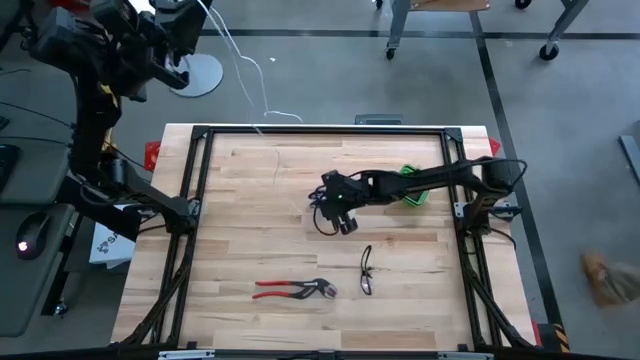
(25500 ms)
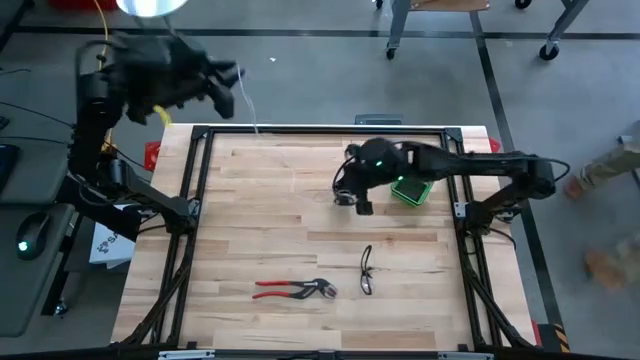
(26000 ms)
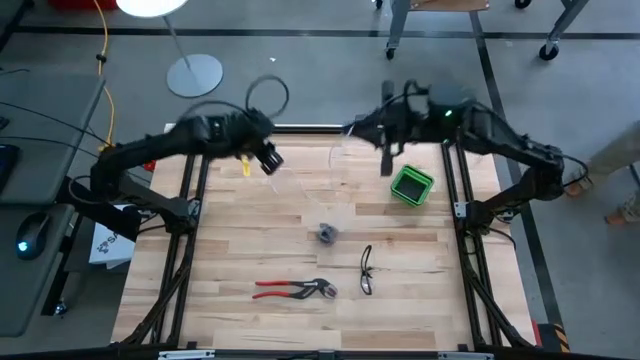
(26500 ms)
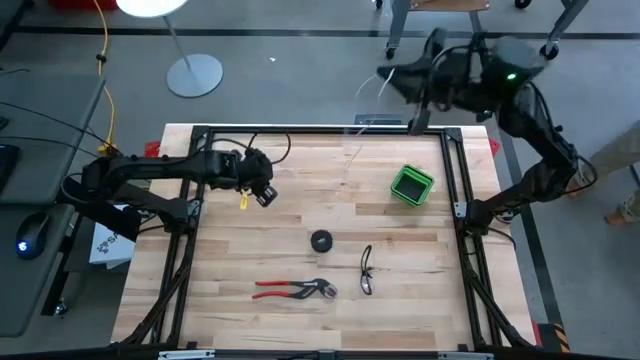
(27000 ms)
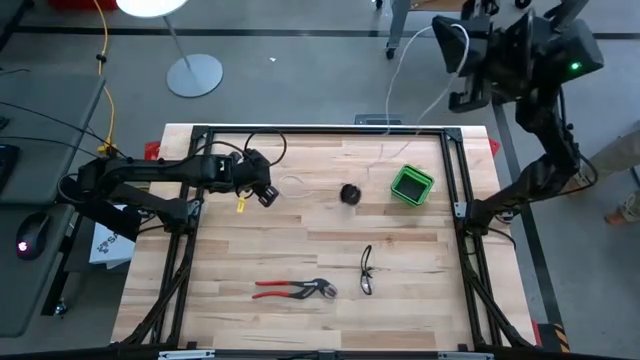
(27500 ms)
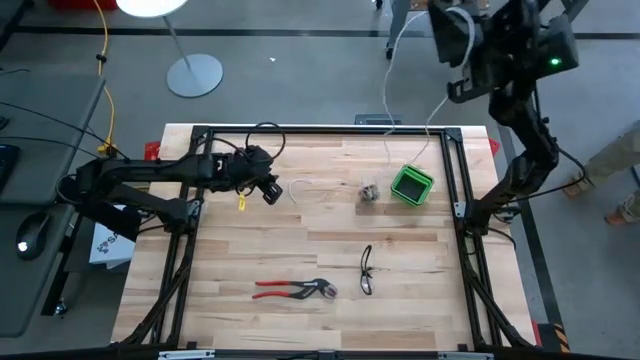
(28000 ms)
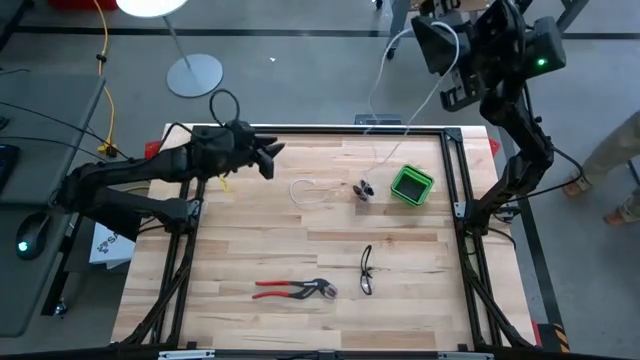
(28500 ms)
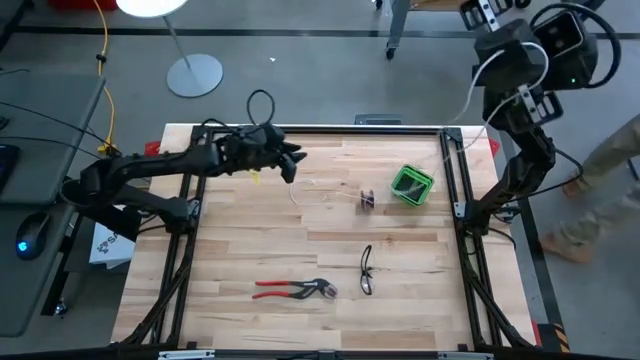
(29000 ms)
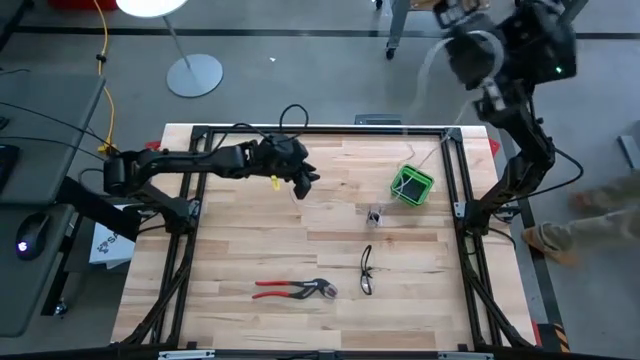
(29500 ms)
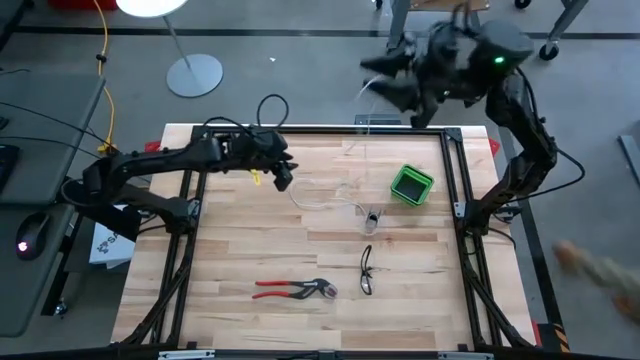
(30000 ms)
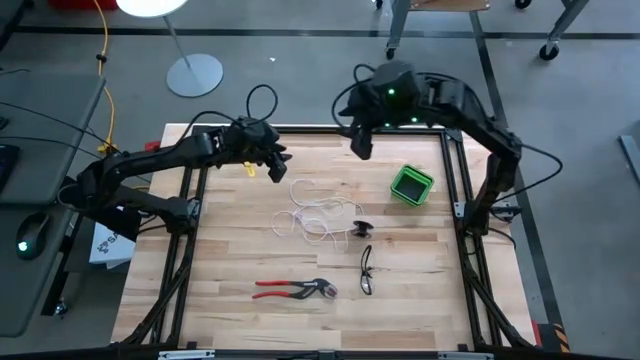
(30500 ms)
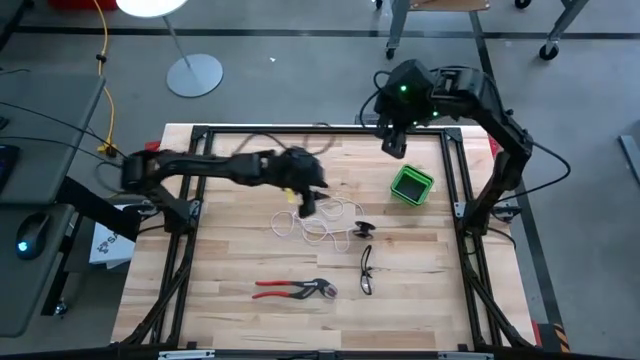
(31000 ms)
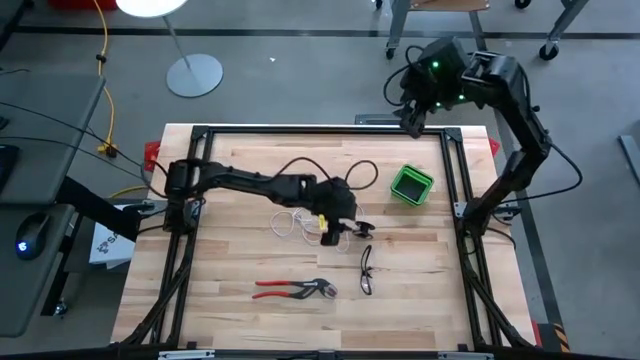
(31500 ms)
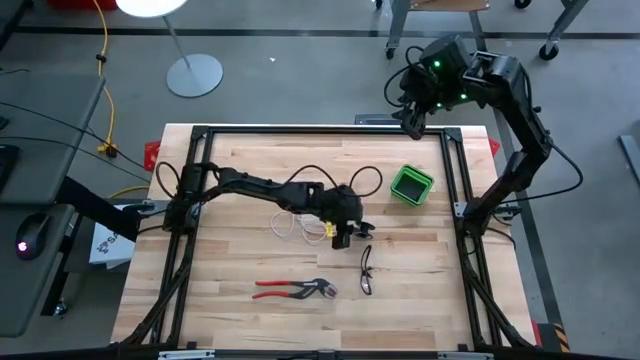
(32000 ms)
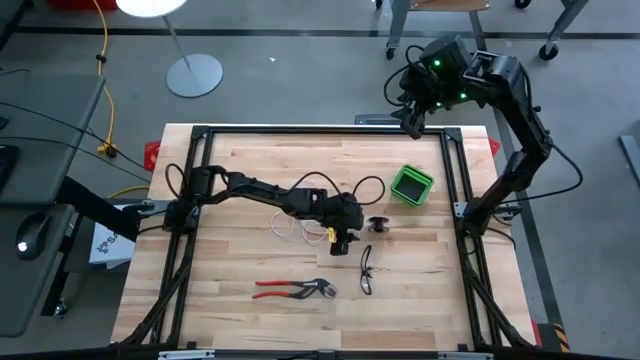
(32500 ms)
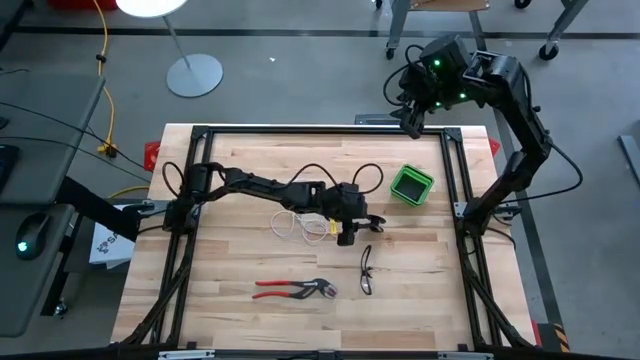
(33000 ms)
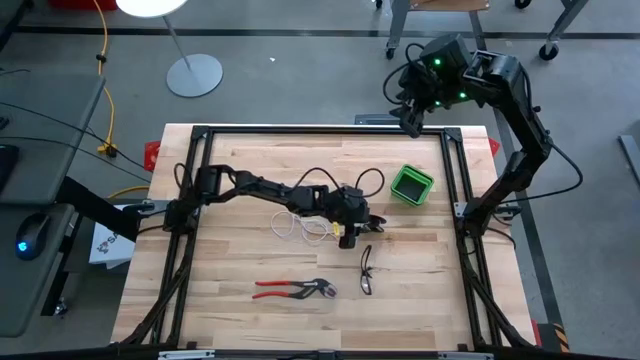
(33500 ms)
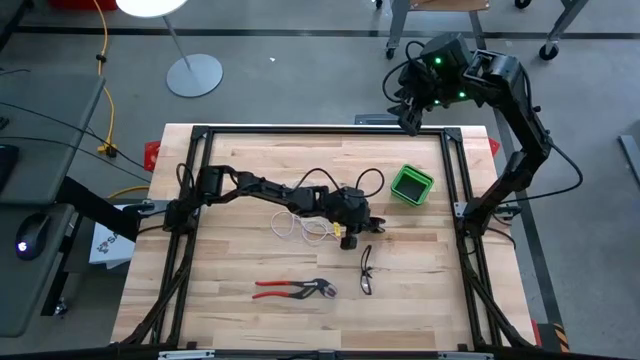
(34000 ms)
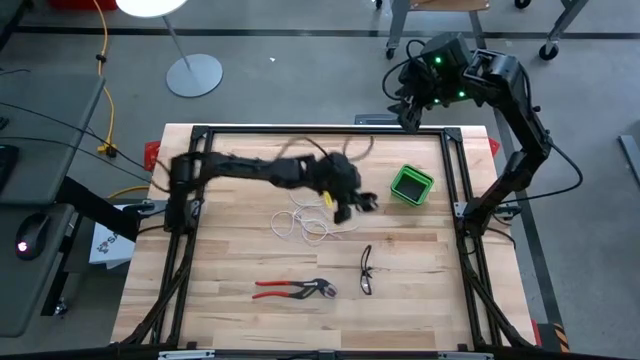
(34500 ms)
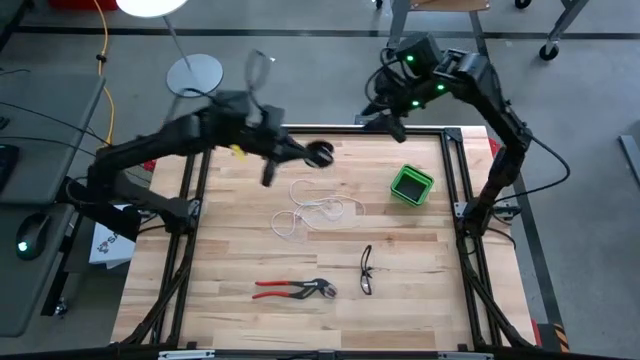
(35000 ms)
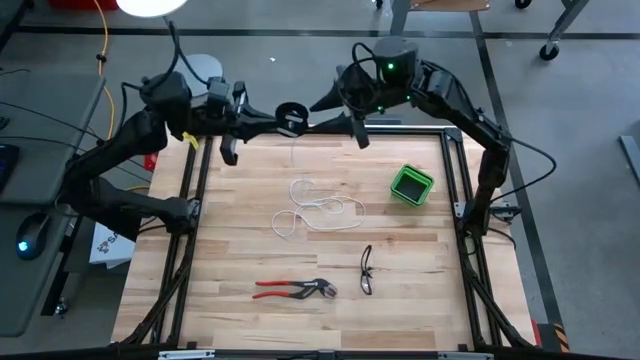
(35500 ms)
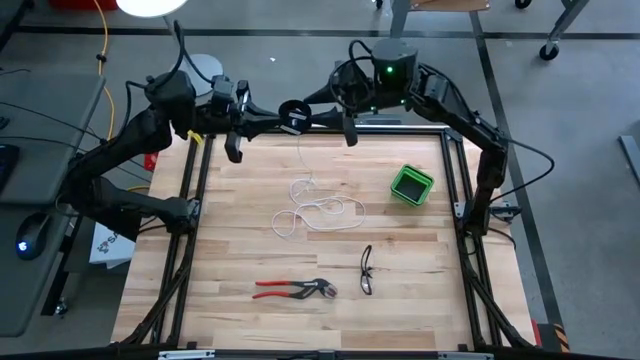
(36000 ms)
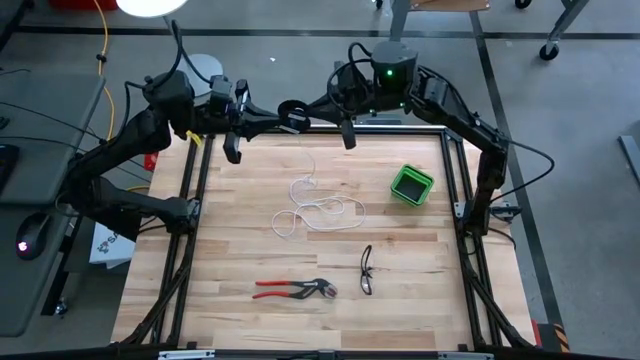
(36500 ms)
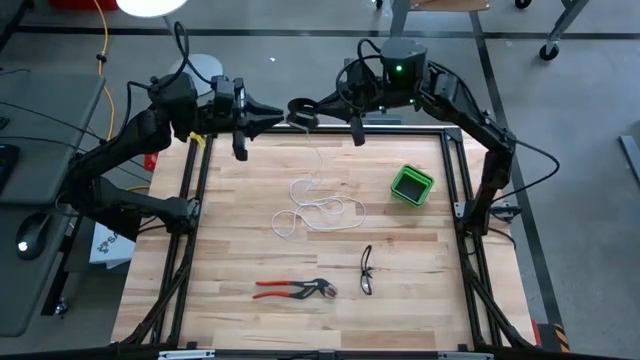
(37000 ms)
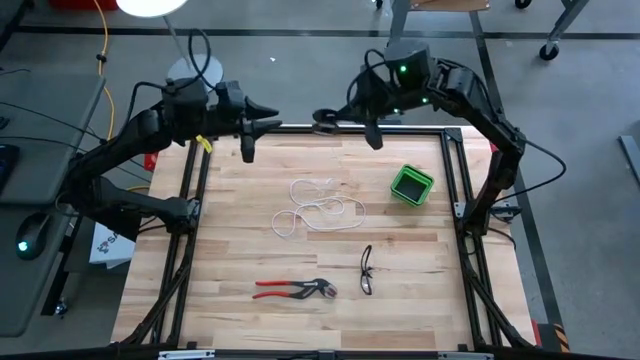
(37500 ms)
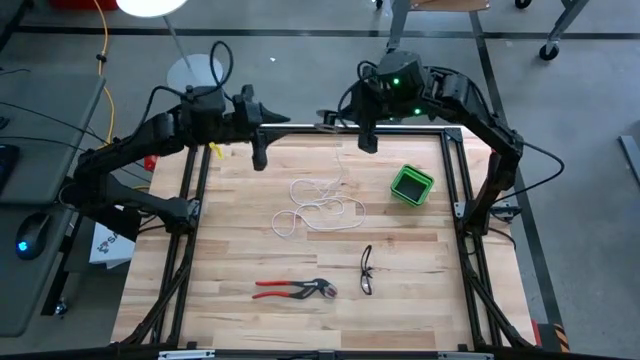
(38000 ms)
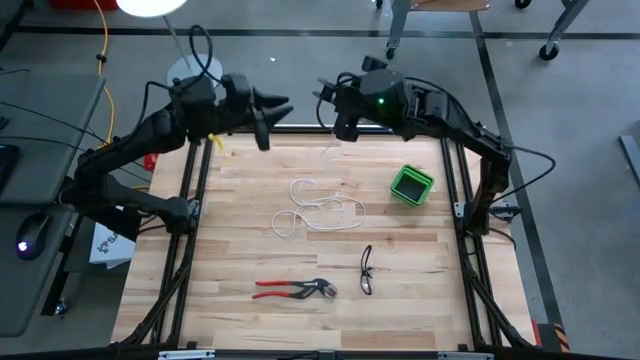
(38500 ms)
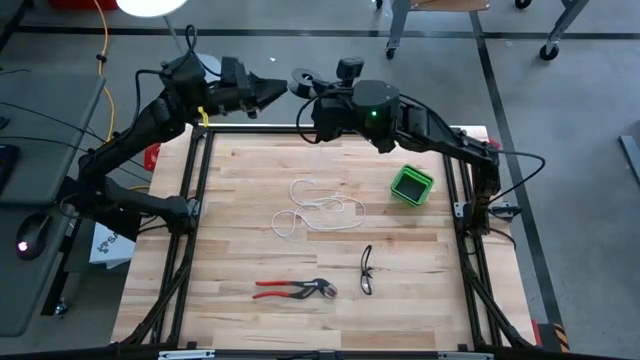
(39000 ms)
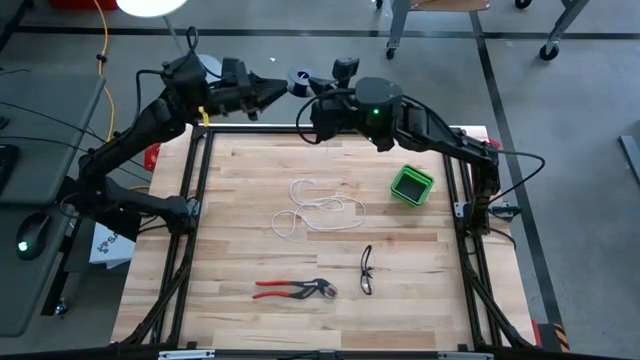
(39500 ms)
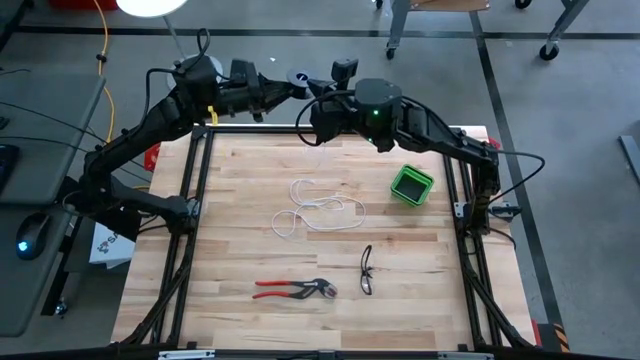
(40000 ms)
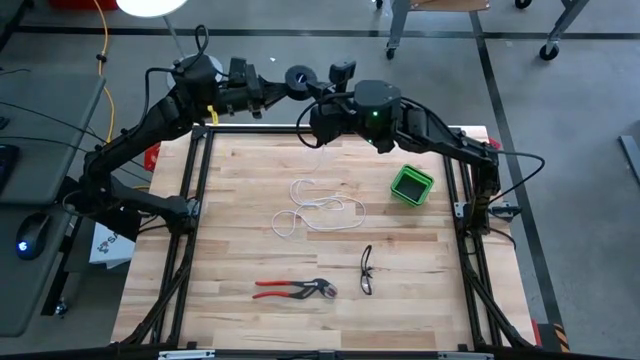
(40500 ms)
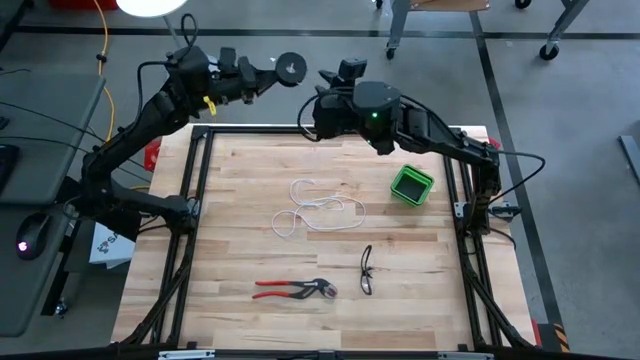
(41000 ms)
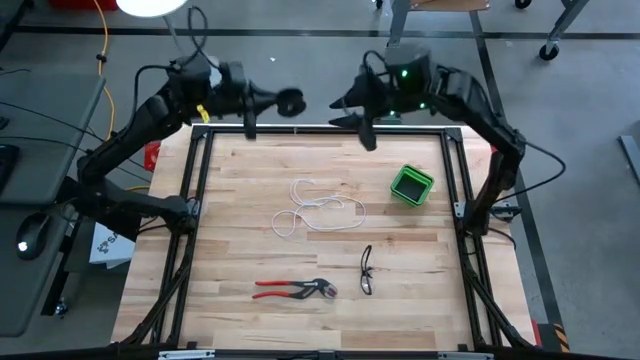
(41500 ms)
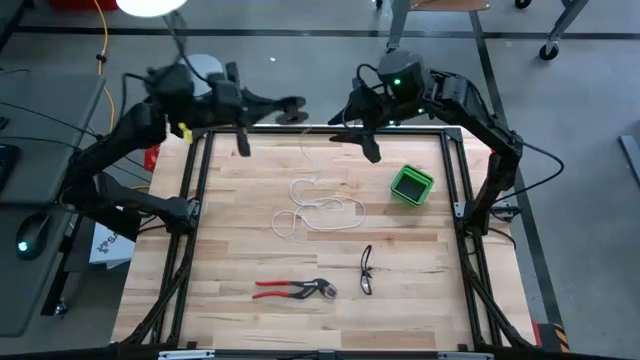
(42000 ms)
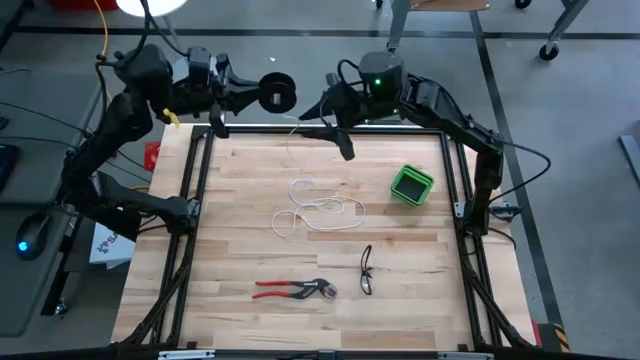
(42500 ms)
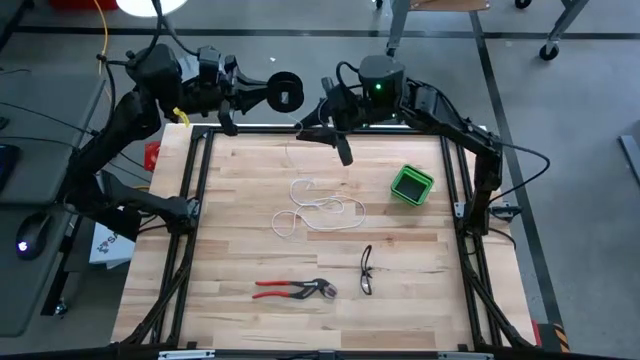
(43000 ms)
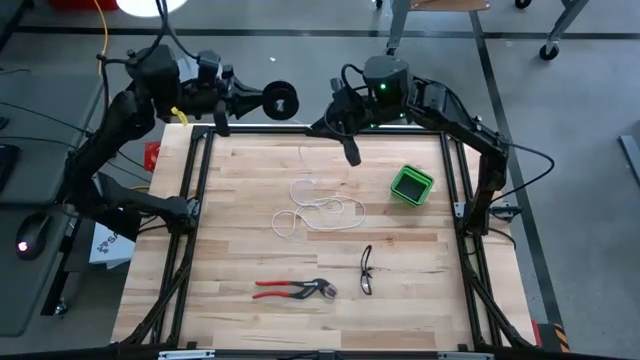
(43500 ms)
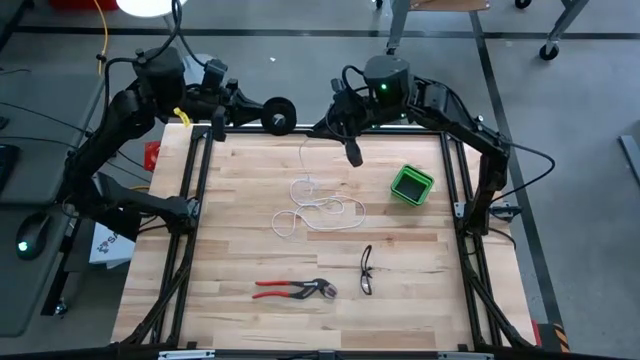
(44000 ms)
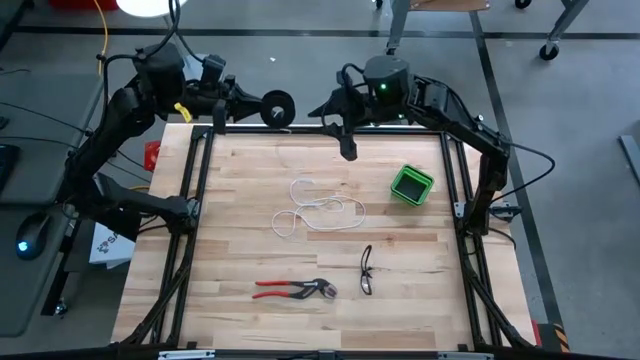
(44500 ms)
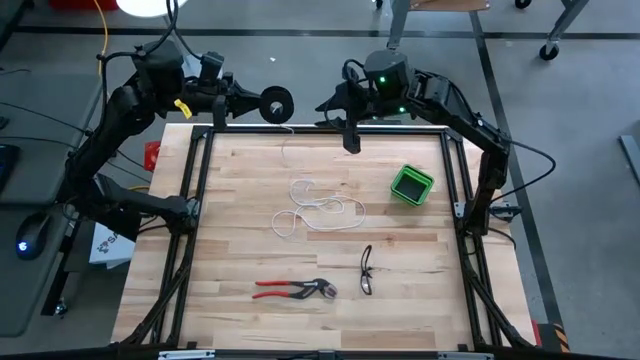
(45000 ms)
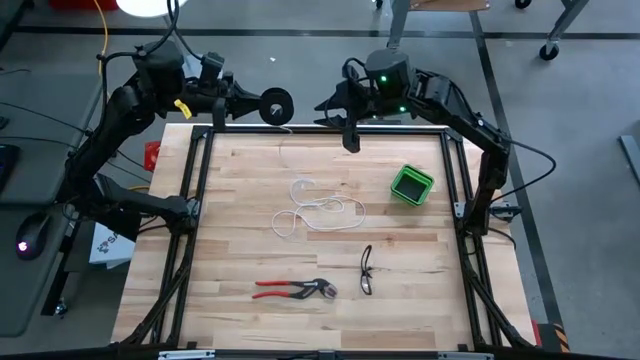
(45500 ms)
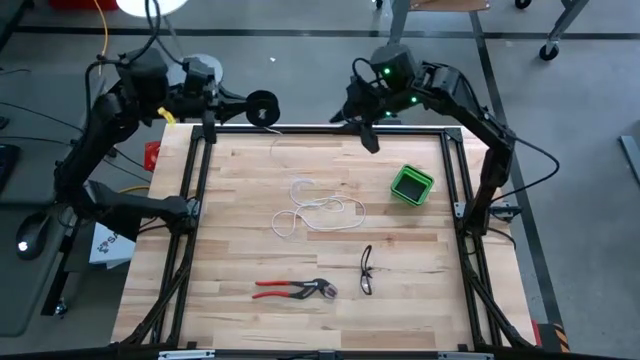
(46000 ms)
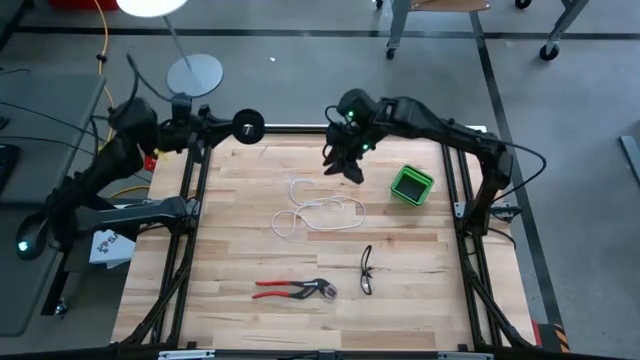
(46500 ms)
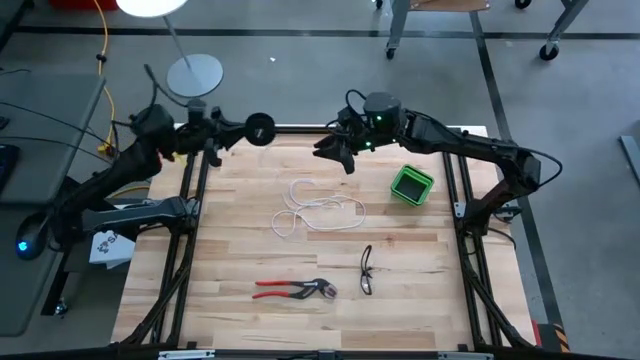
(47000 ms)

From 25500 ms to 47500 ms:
Task: Coil cords
Uncoil the wire from the spool
